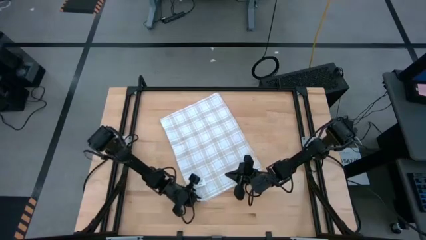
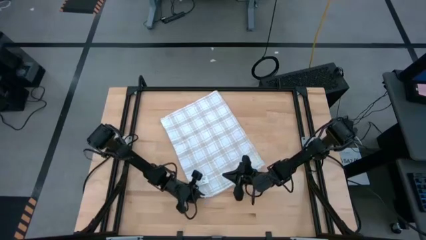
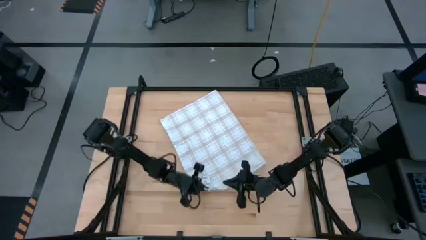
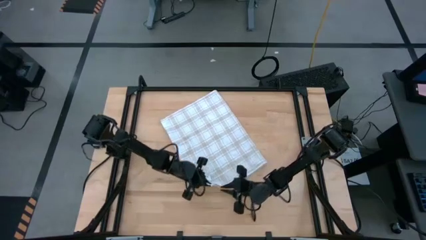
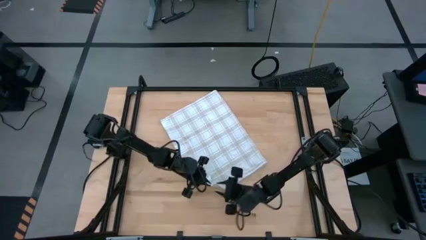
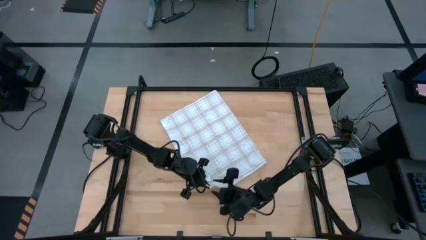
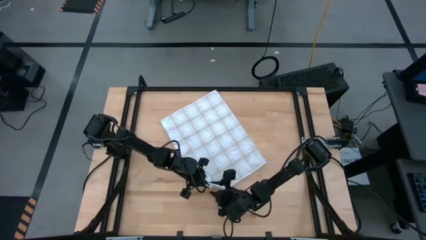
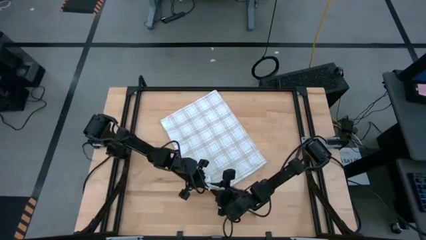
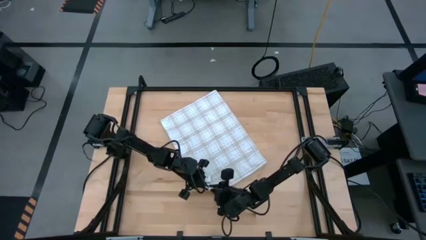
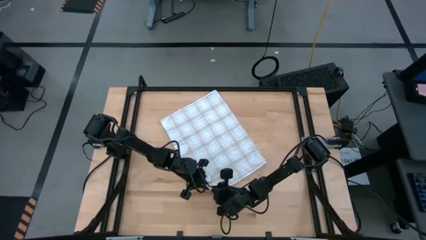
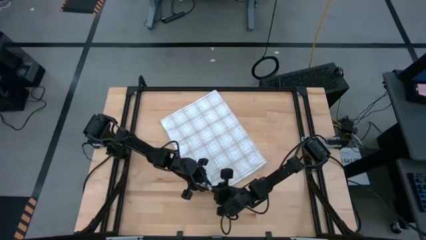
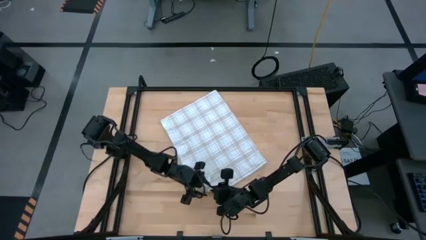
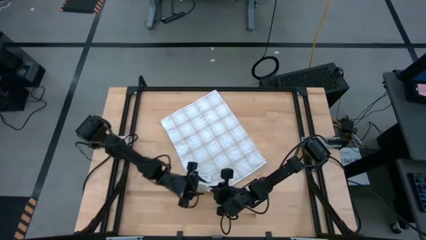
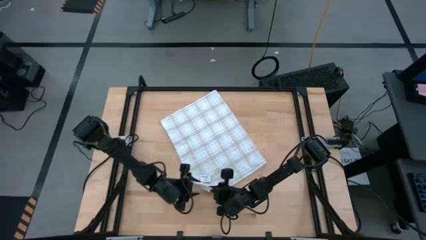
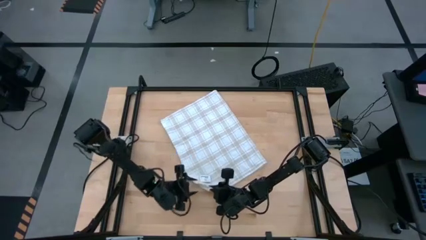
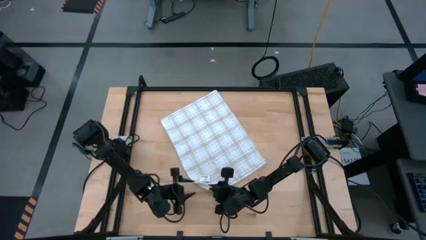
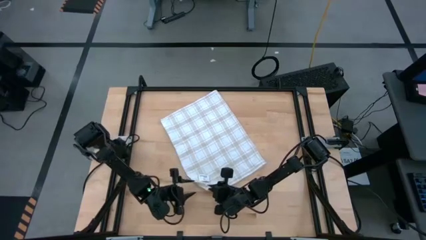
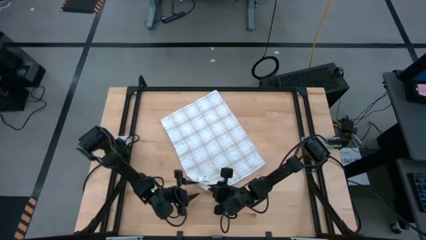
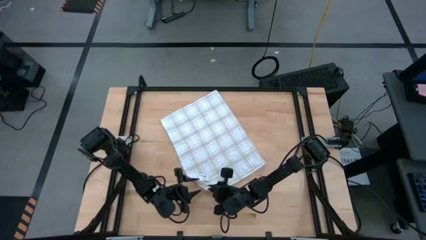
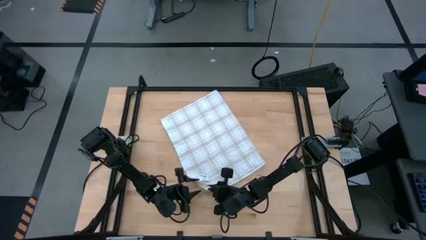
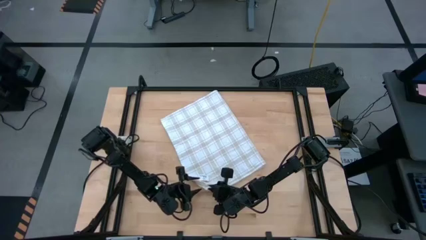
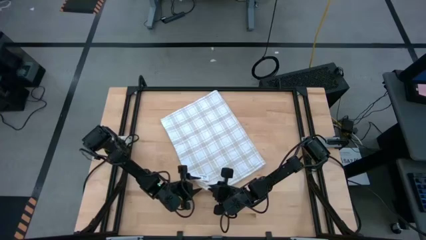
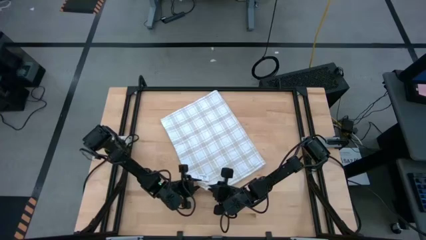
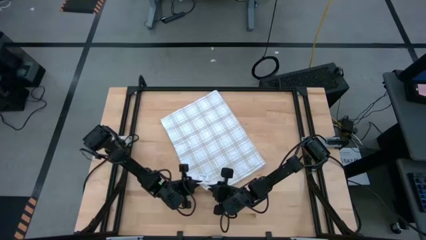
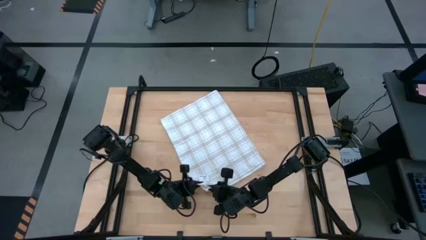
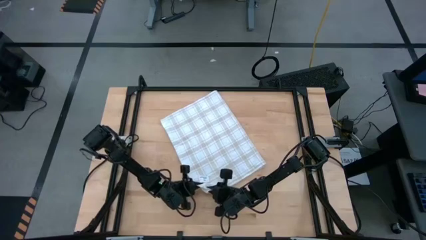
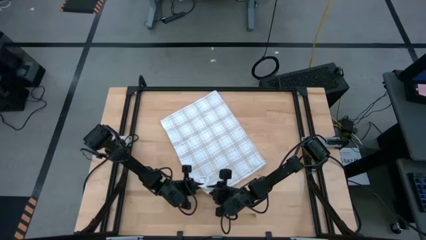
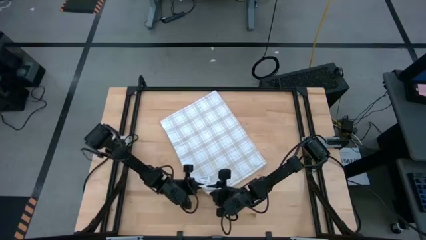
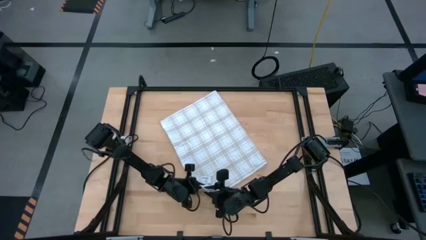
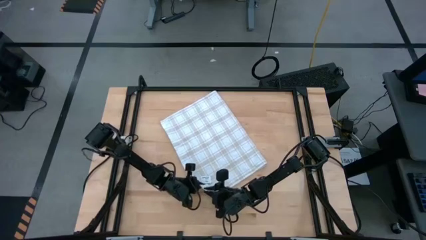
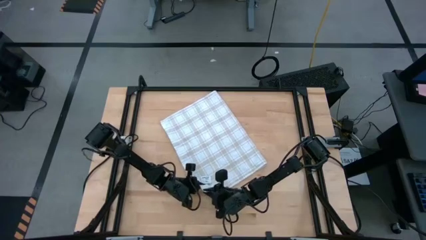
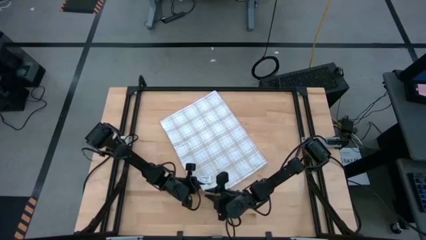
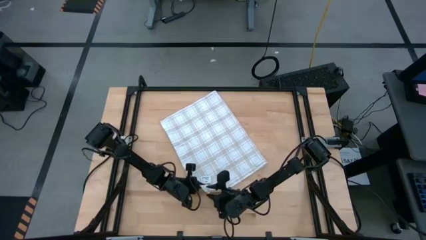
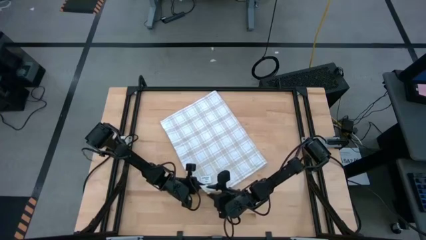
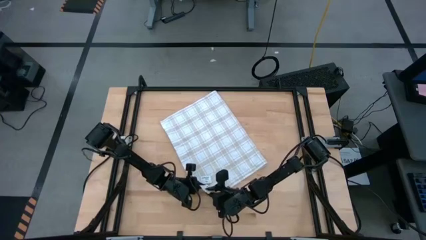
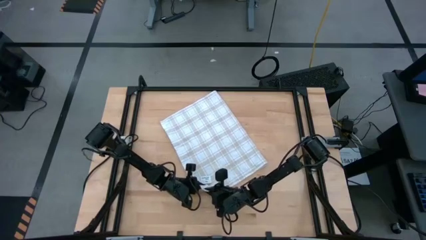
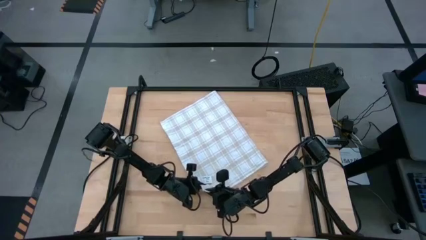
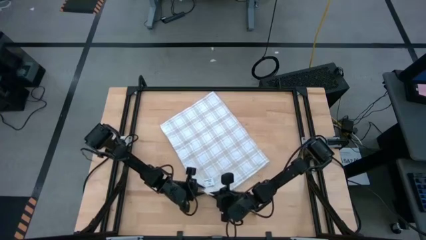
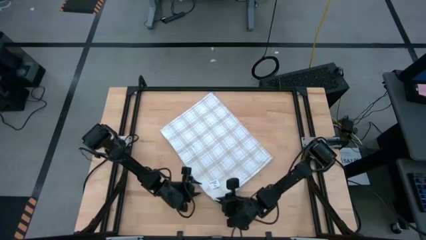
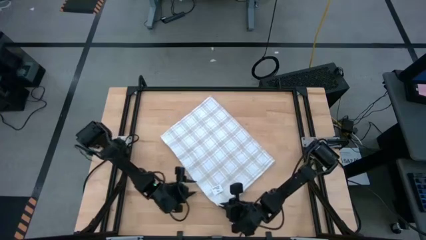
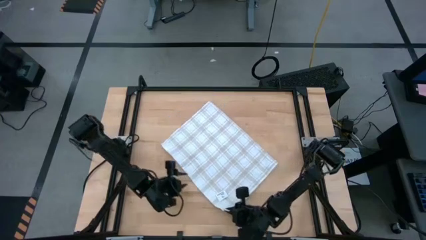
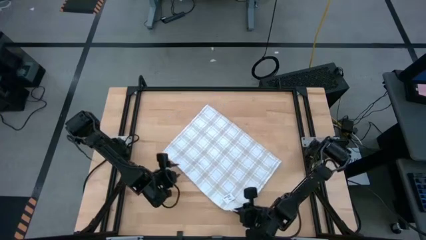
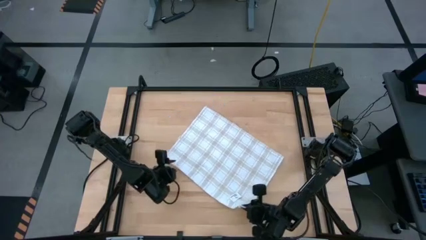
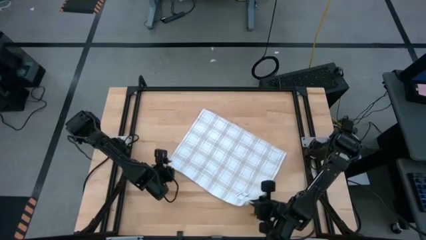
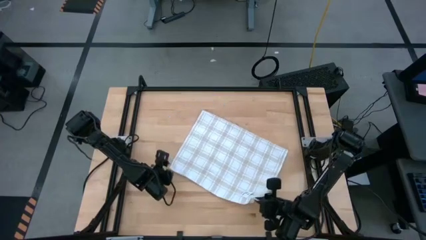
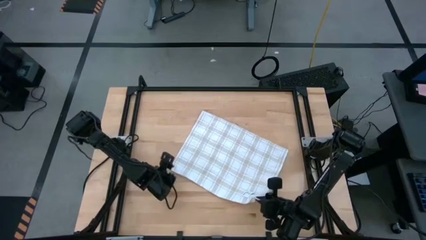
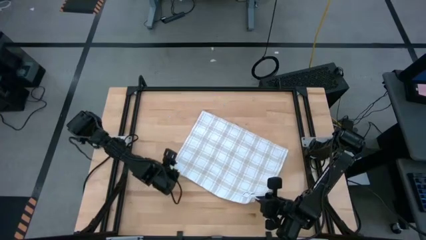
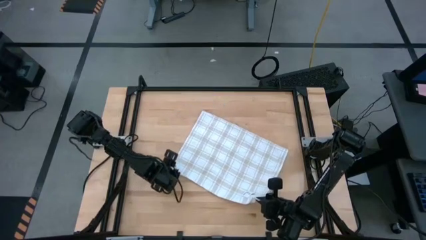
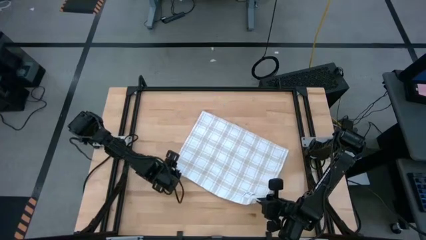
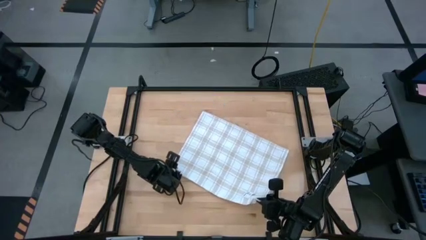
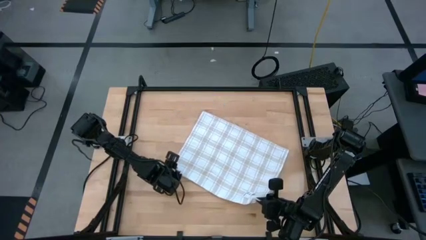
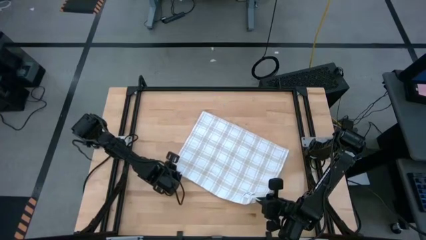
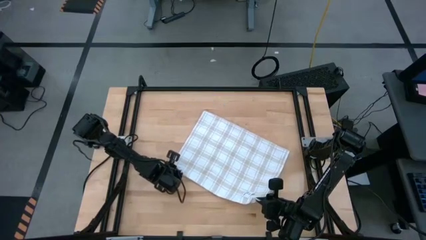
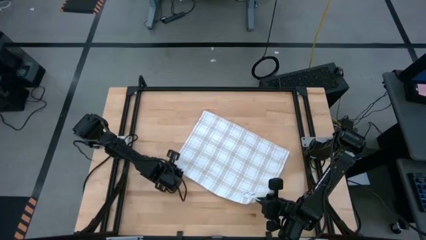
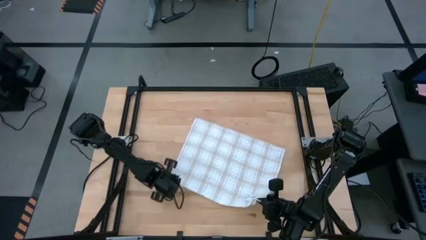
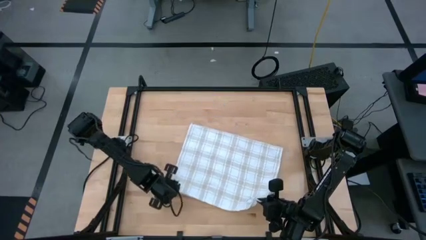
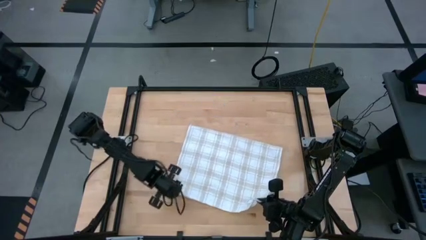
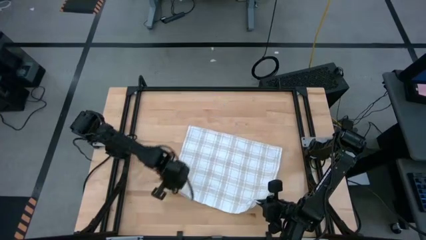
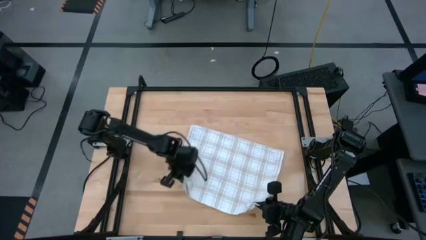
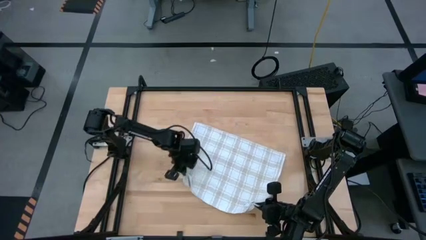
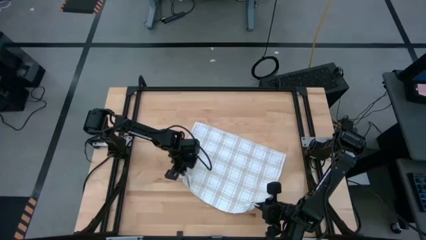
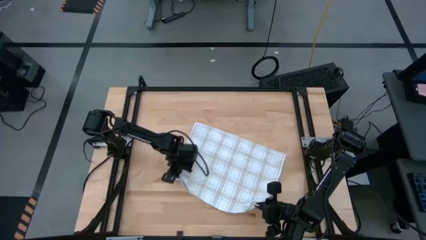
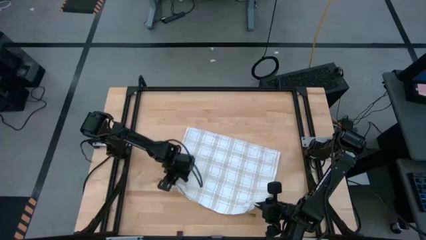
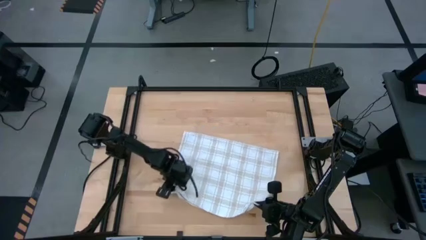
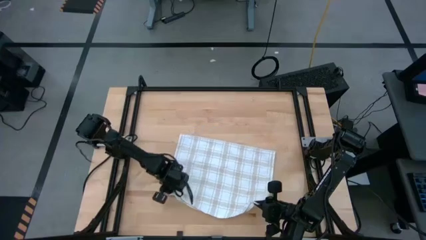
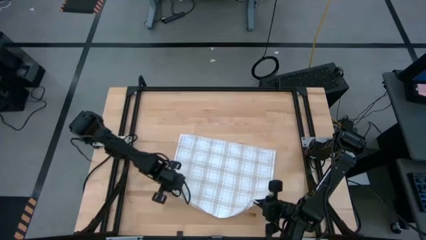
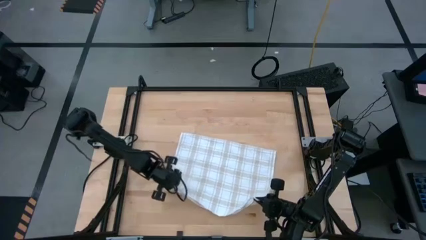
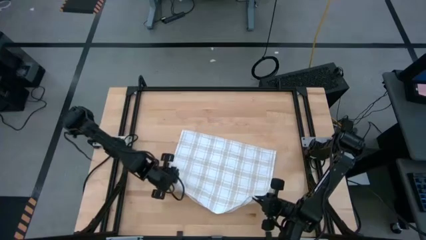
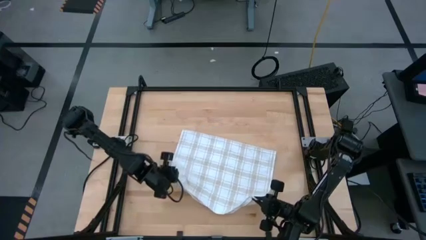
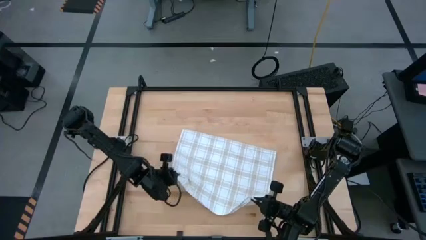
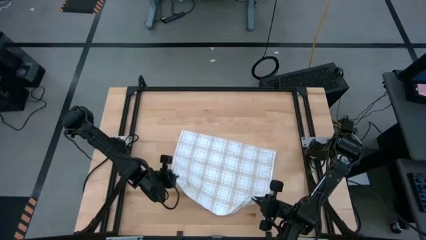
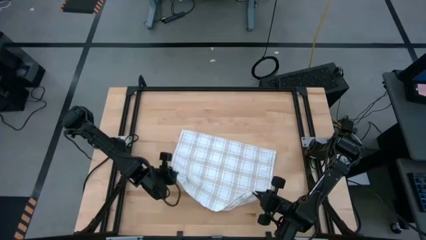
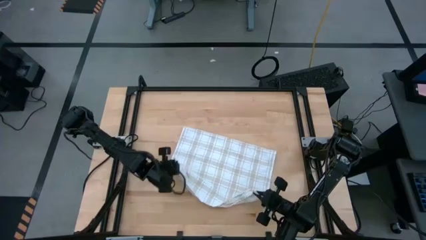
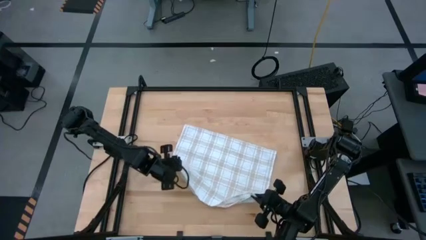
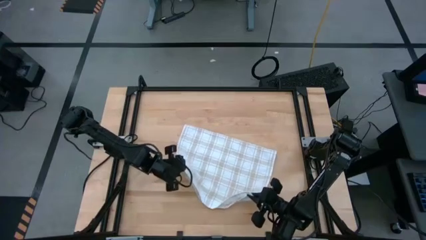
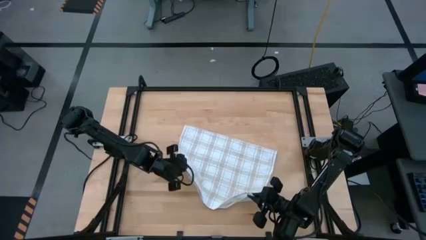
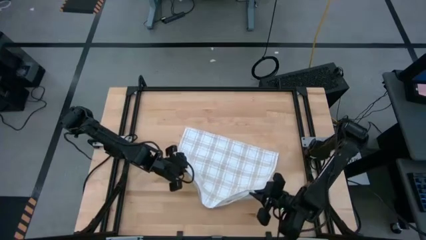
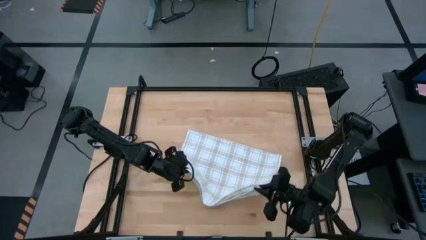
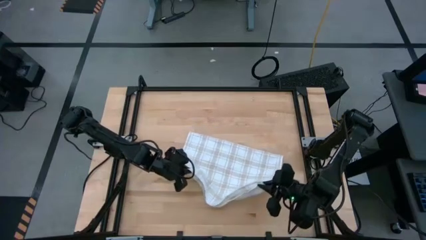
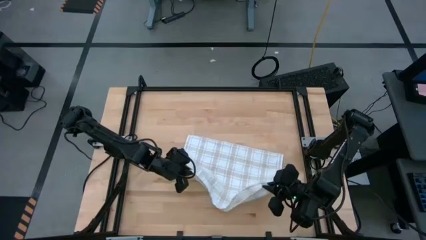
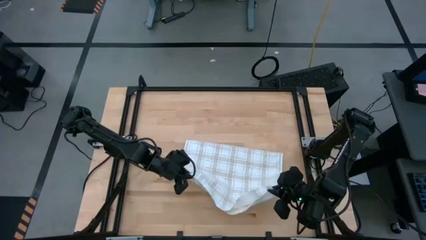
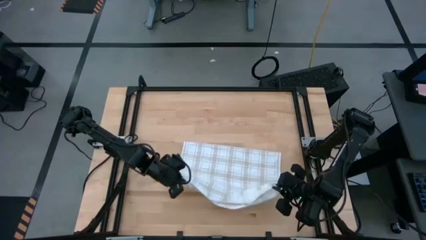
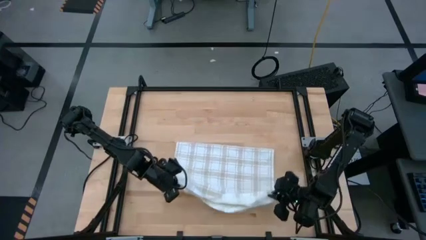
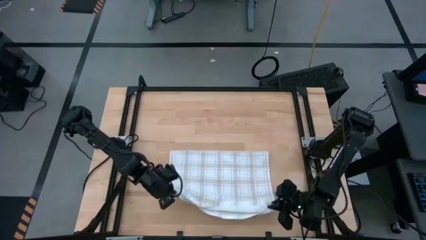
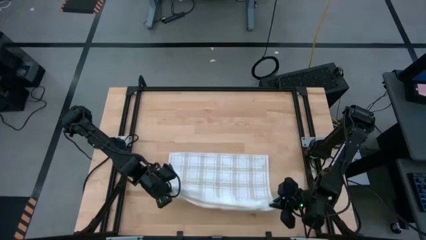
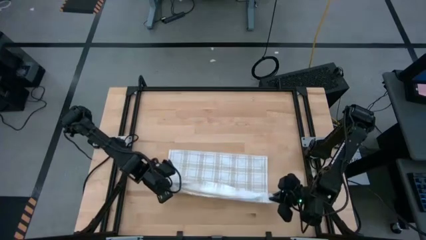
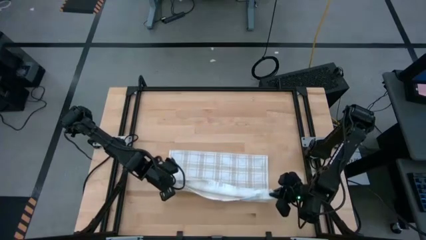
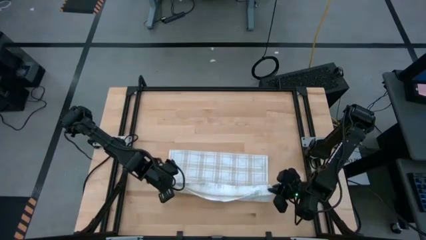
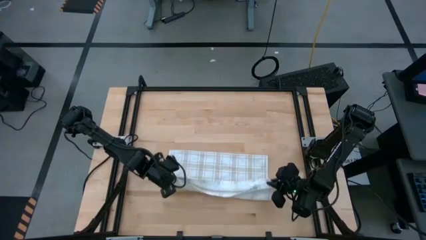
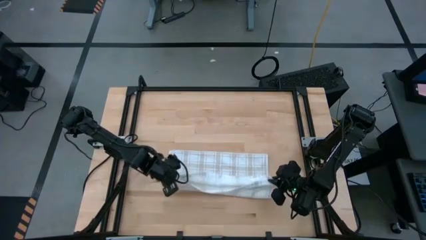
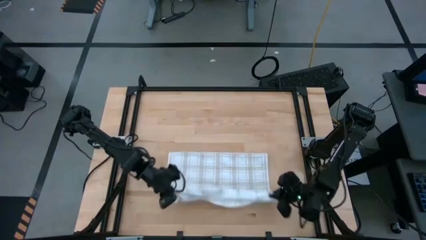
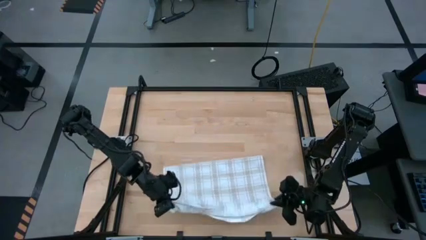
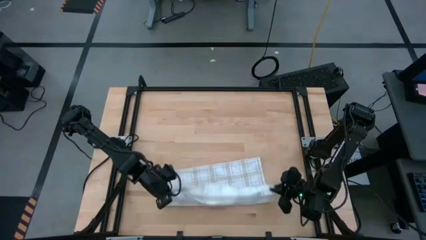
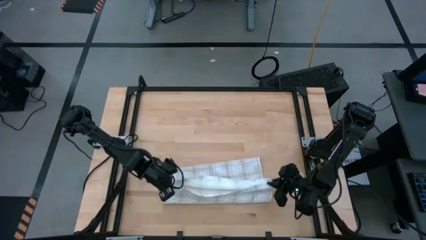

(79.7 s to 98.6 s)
Task: Roll towel
Roll the white kitchen towel
